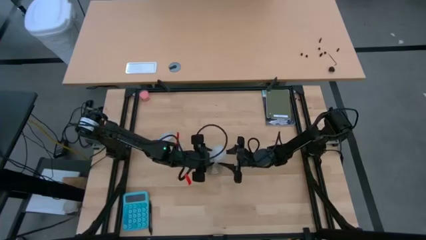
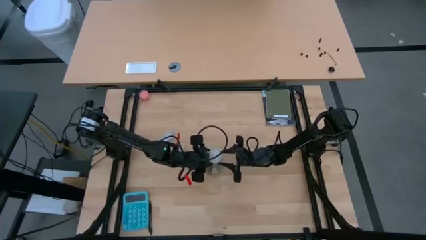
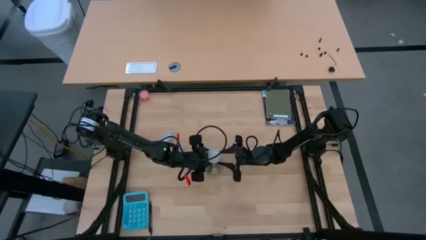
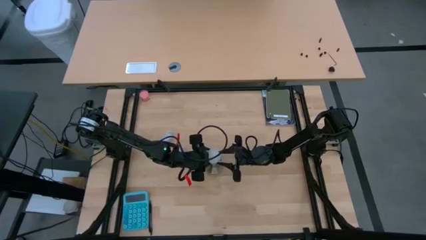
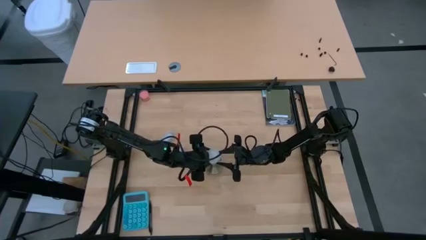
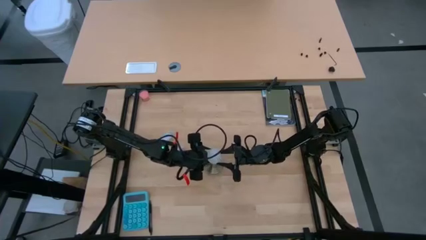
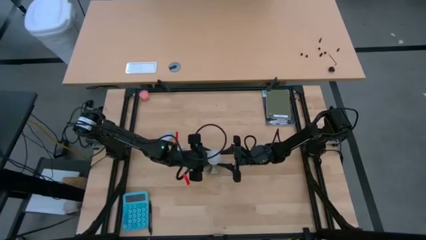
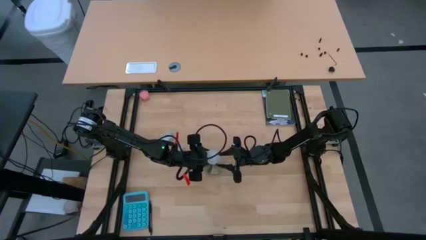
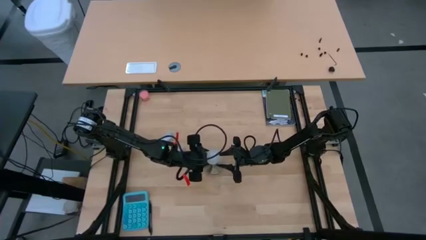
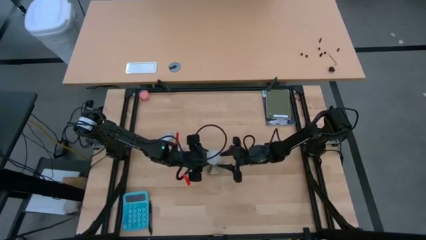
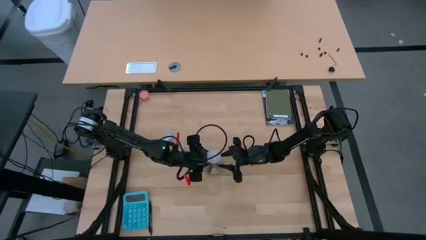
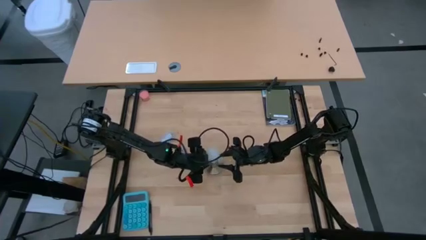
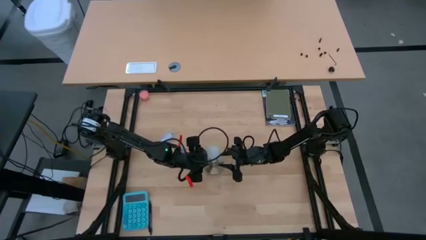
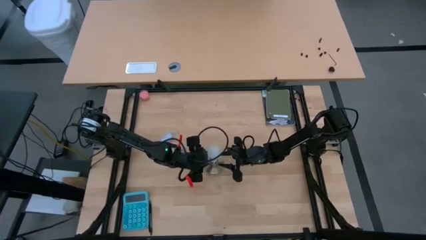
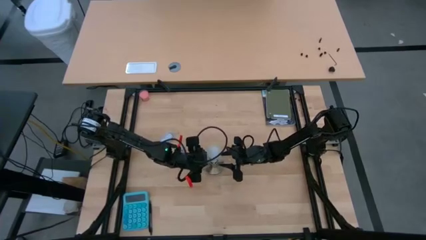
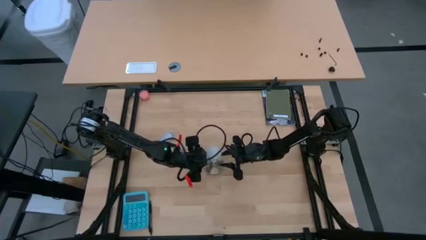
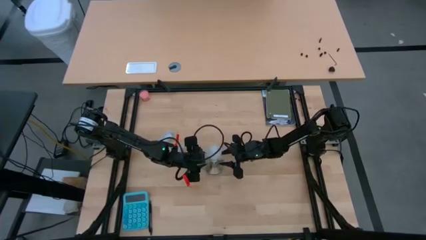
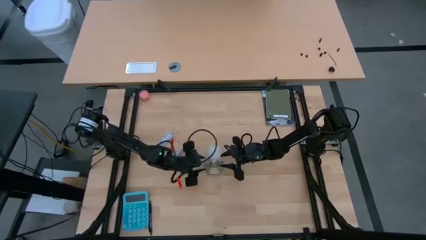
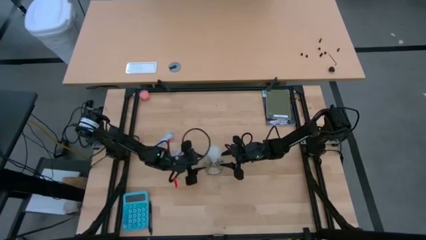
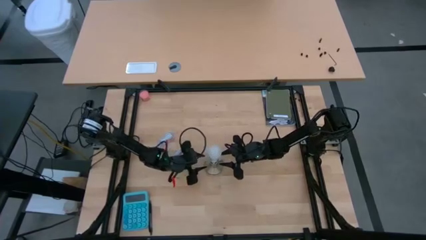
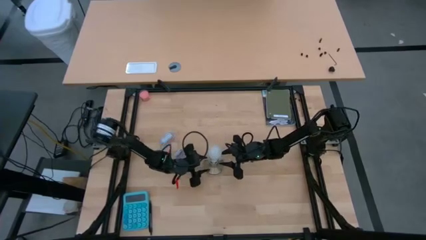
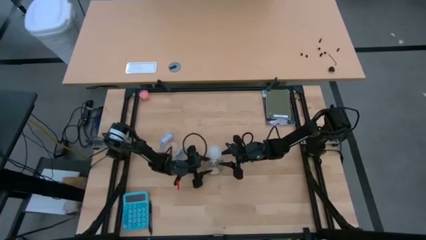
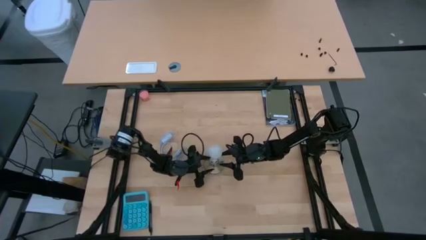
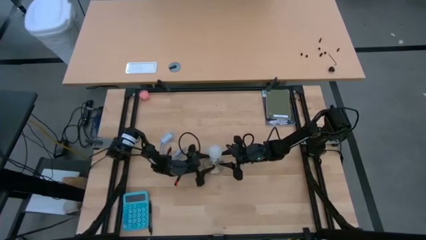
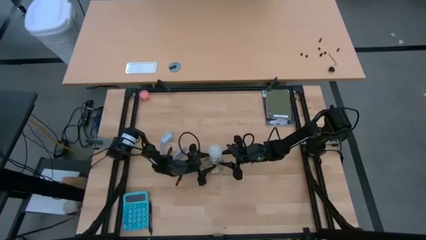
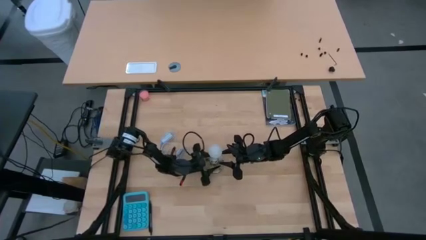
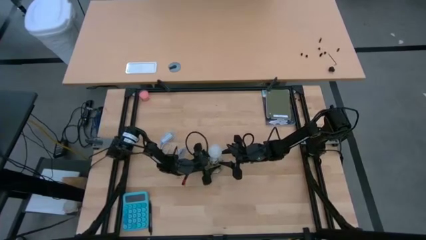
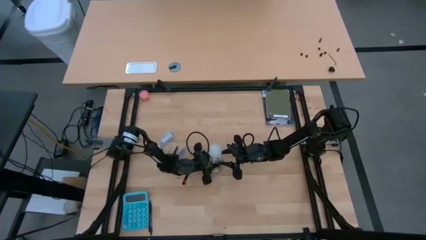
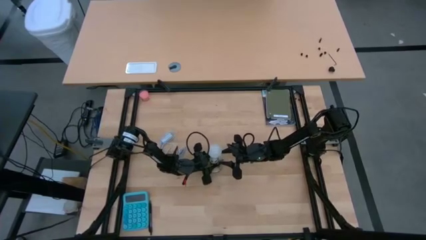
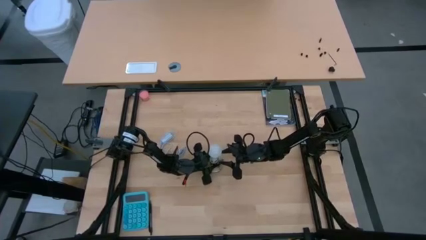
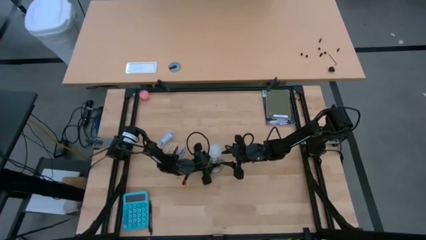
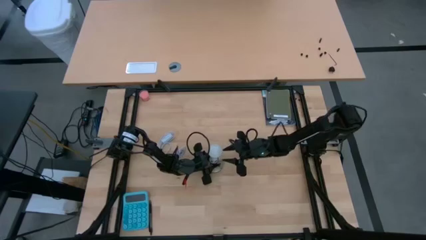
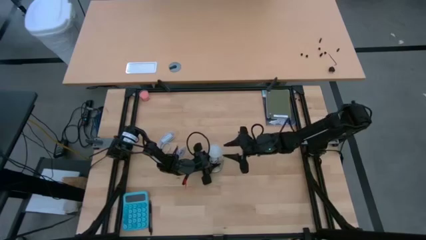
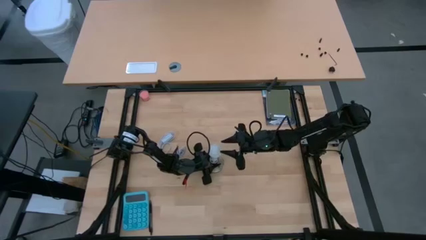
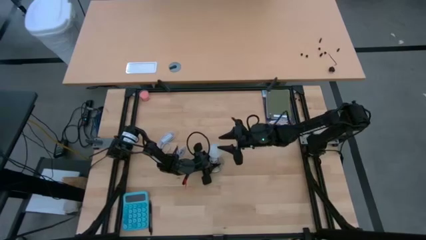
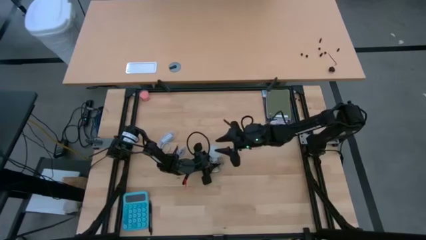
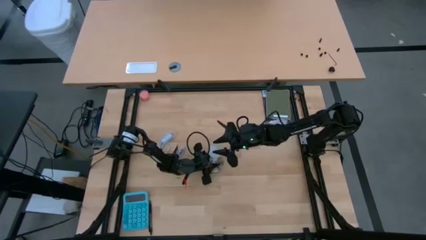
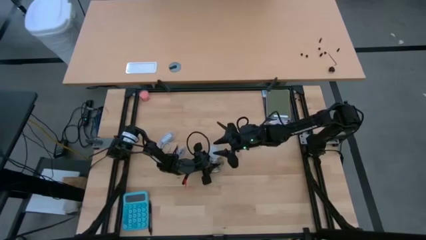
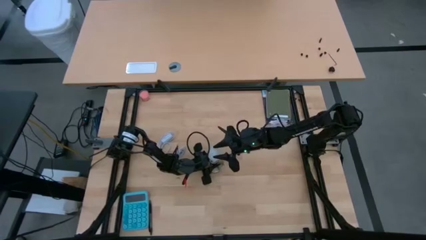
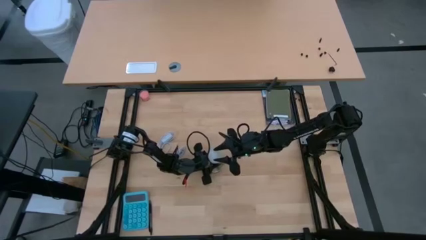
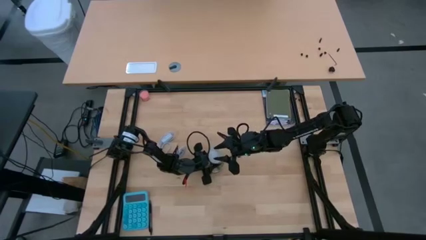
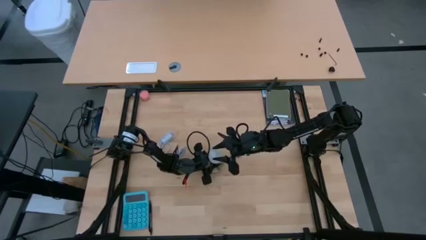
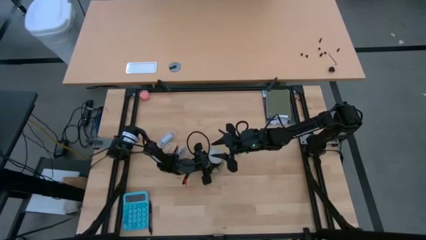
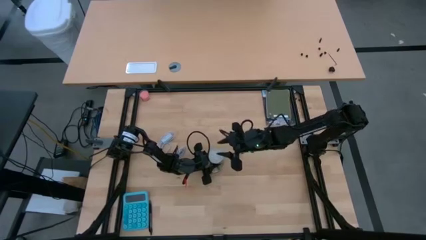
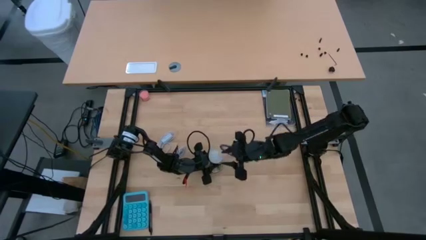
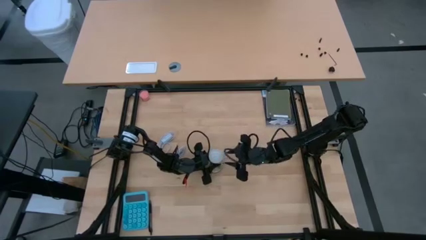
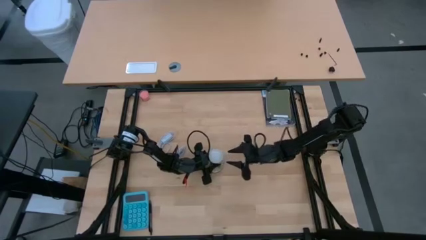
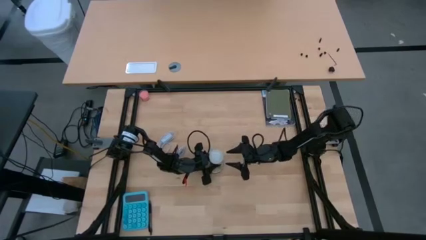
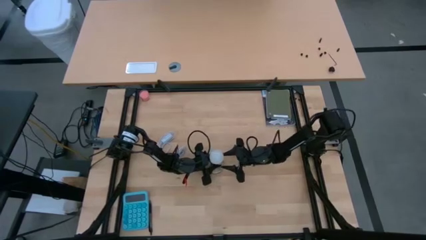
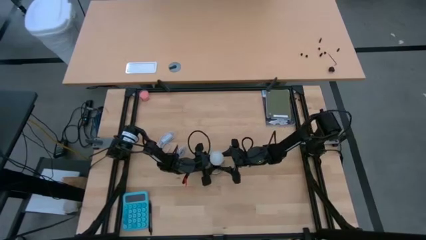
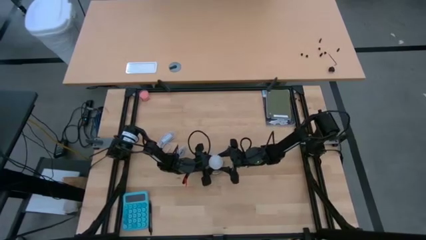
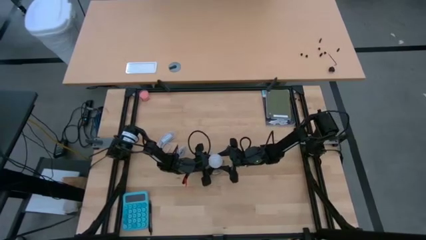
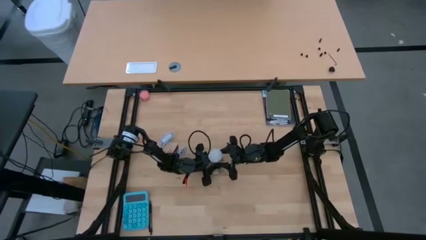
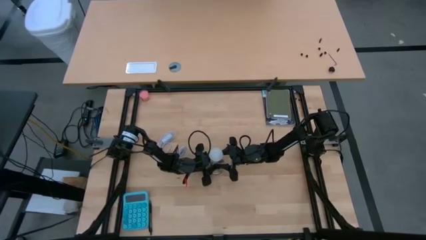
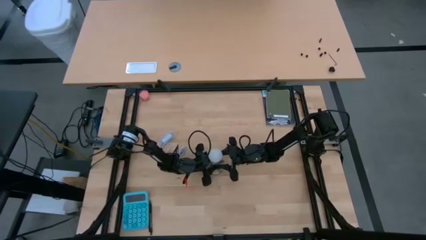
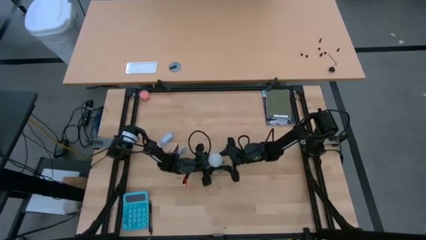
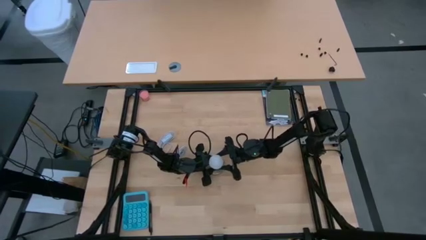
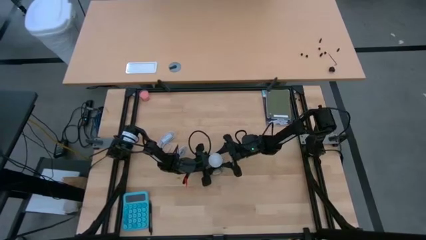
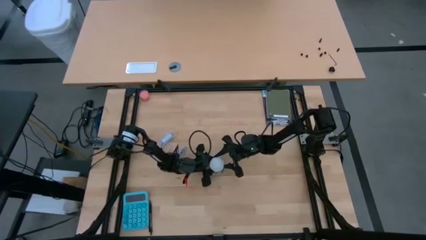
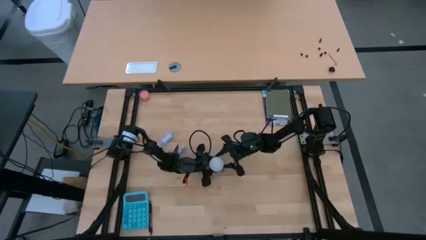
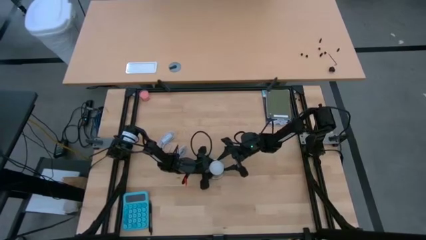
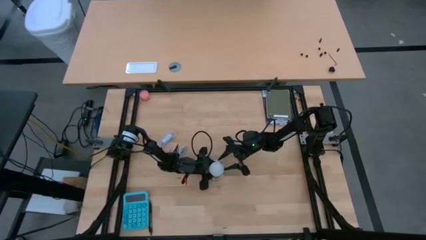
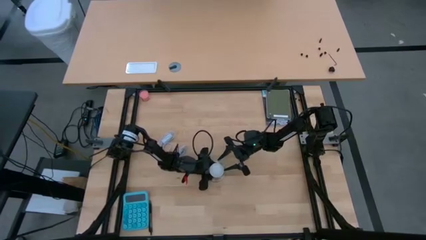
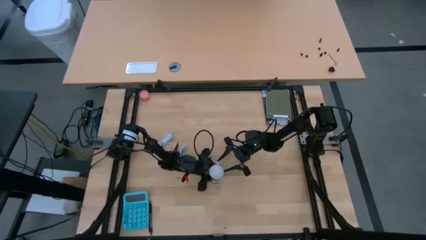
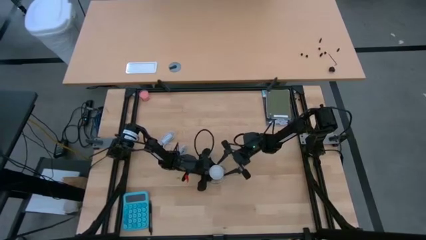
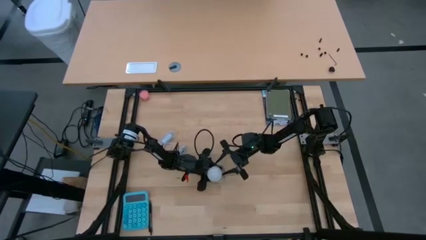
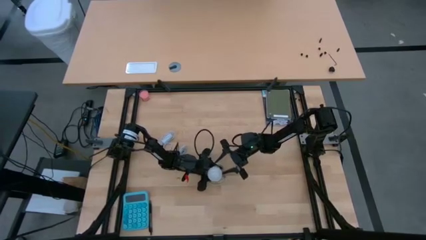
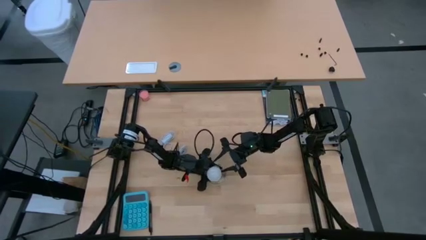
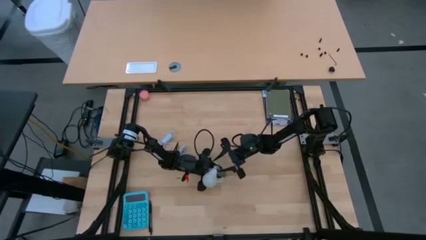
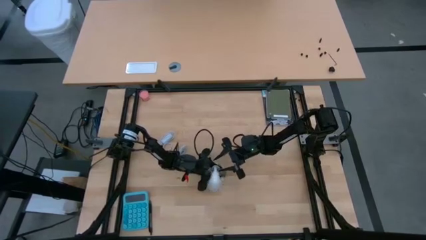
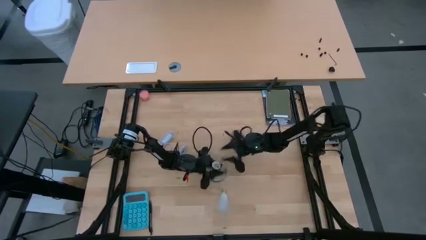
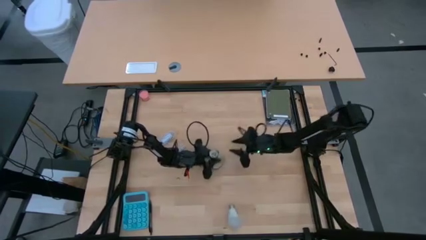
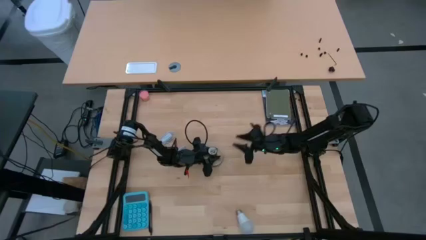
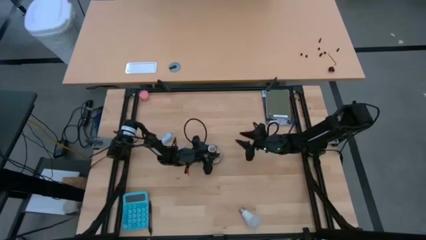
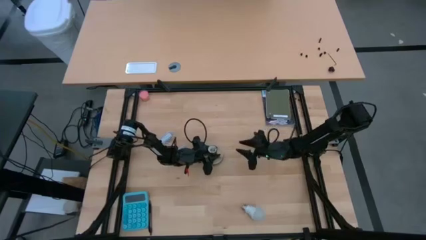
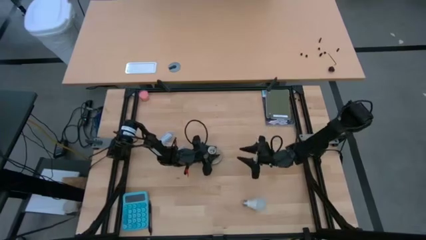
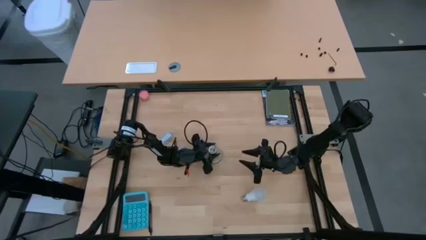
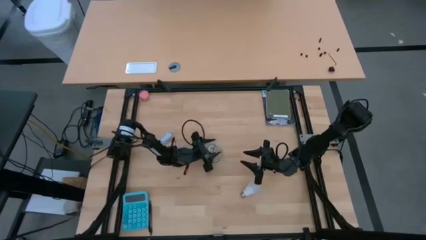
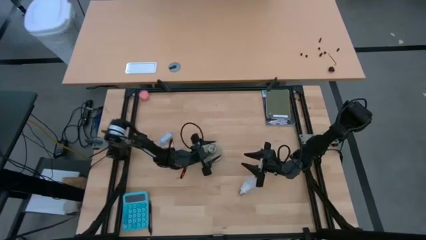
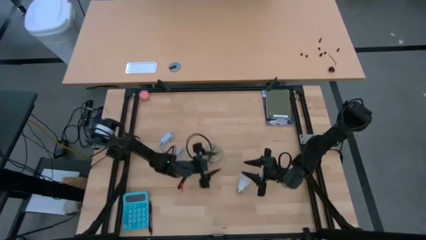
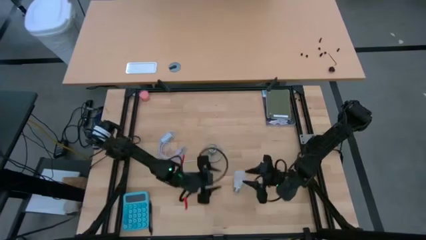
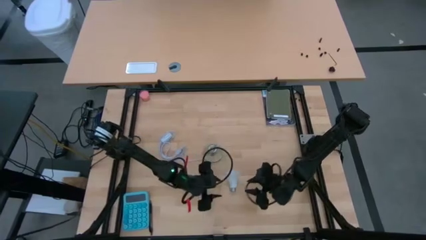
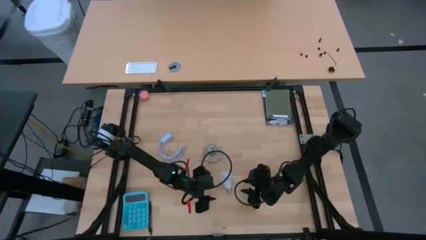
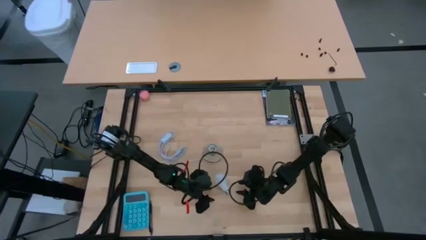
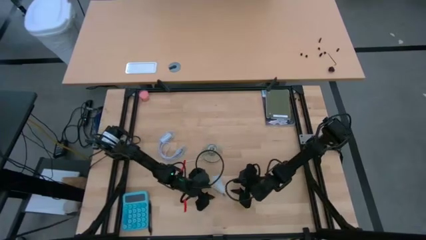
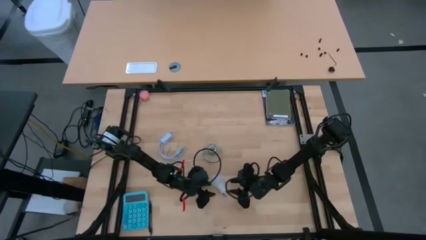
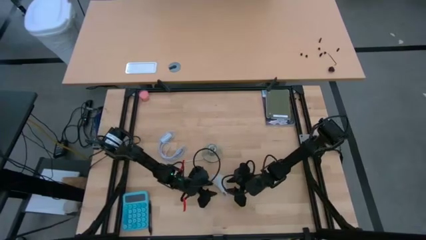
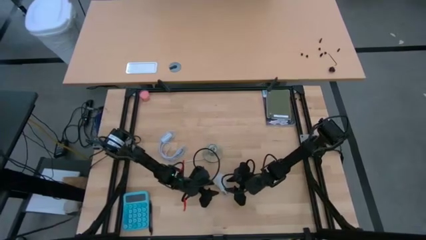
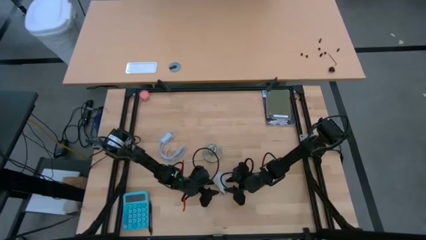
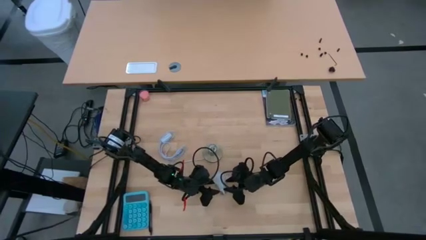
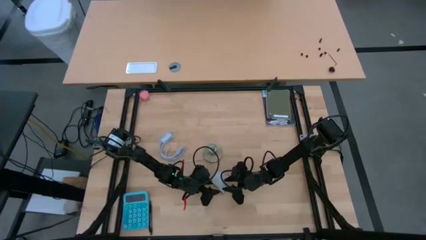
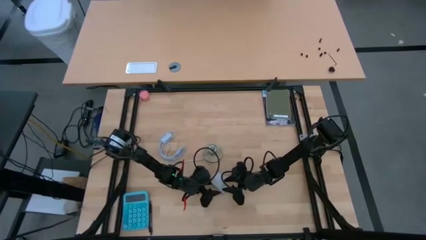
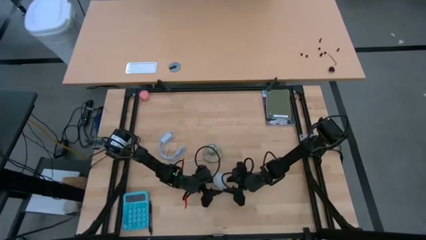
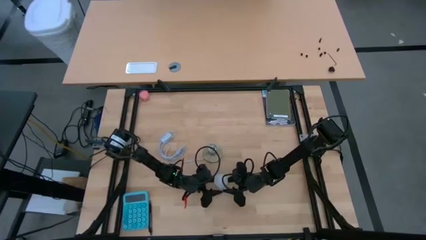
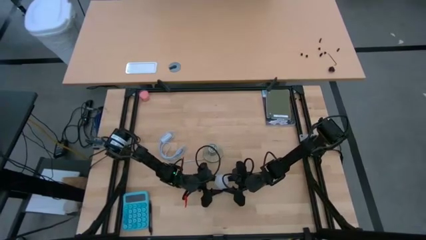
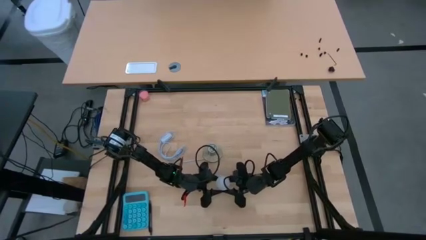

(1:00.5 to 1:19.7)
Task: Screw lightbulb
Insert the lightbulb into the lamp holder
